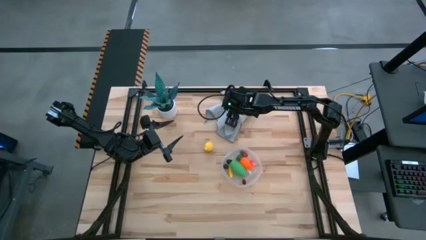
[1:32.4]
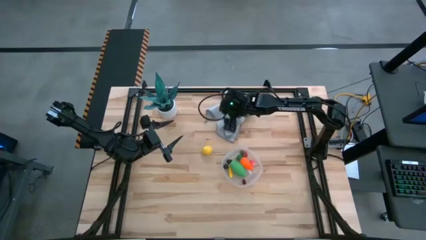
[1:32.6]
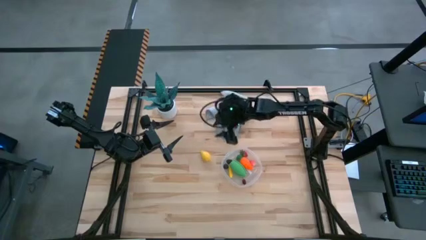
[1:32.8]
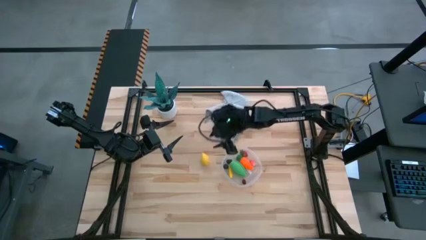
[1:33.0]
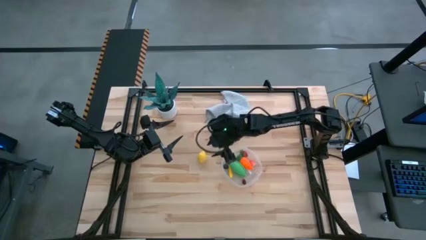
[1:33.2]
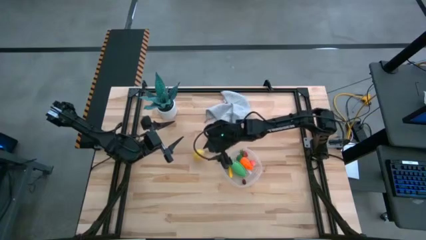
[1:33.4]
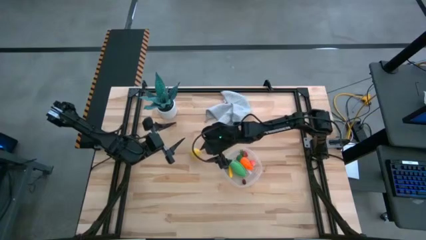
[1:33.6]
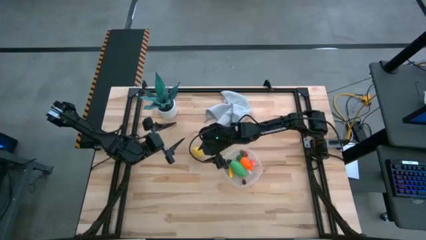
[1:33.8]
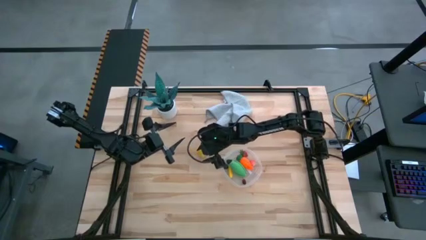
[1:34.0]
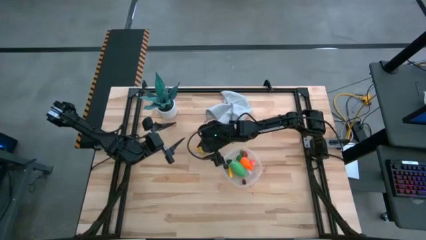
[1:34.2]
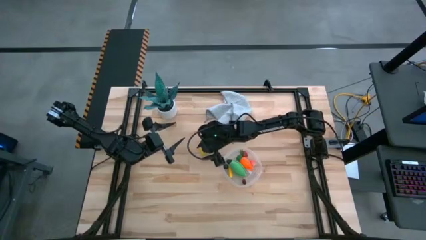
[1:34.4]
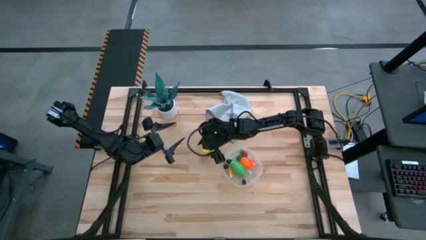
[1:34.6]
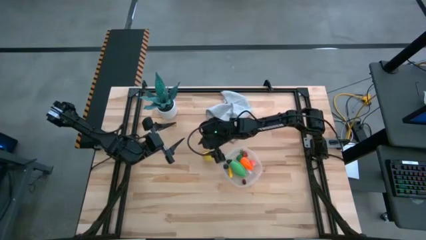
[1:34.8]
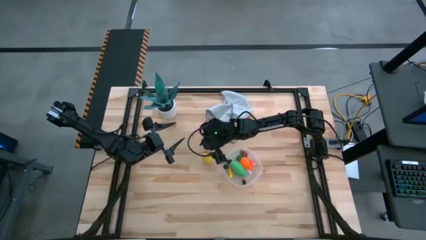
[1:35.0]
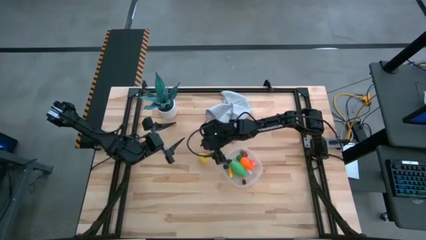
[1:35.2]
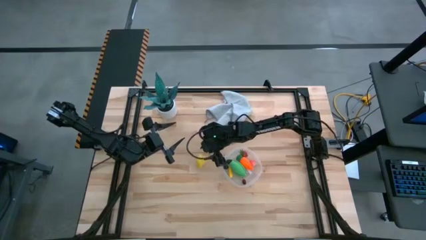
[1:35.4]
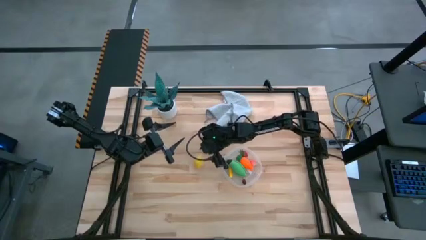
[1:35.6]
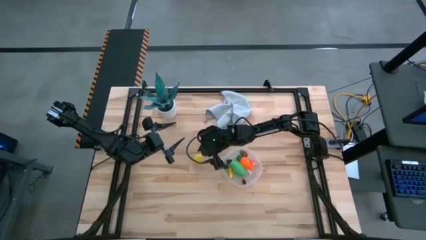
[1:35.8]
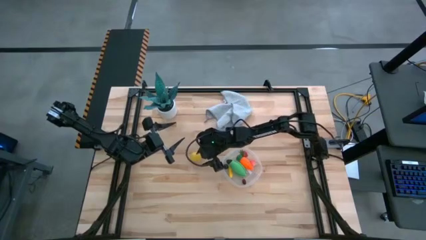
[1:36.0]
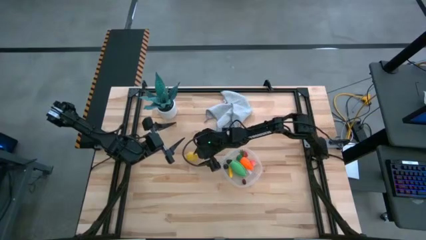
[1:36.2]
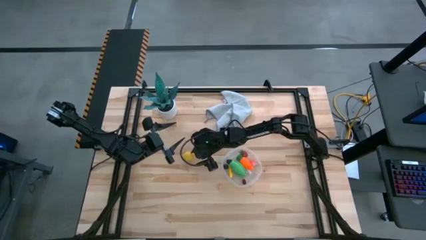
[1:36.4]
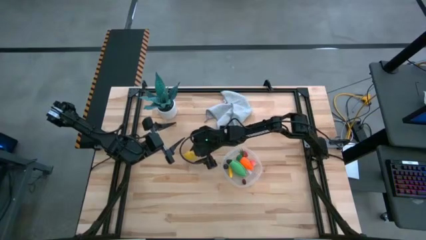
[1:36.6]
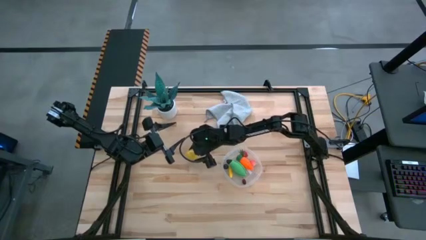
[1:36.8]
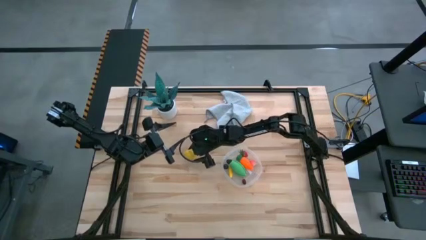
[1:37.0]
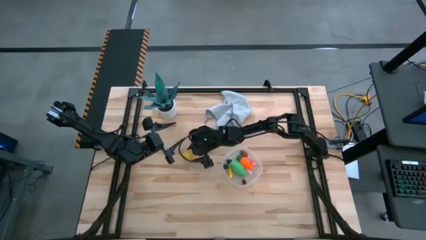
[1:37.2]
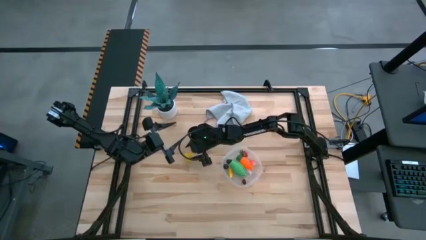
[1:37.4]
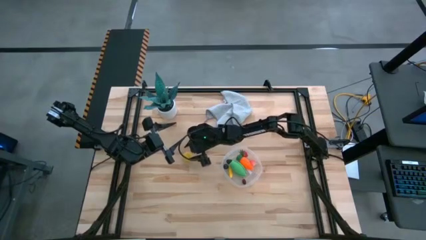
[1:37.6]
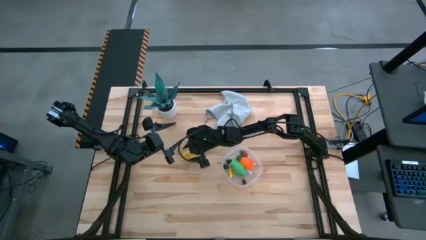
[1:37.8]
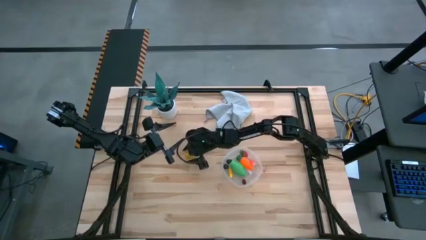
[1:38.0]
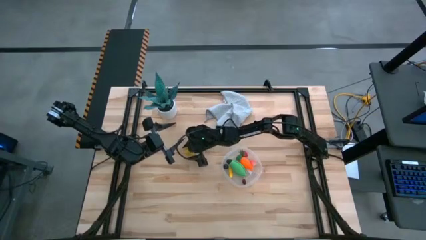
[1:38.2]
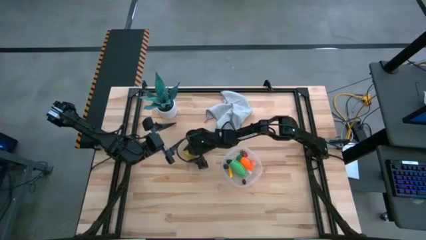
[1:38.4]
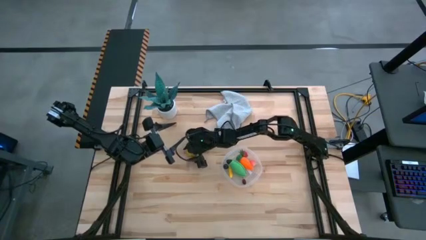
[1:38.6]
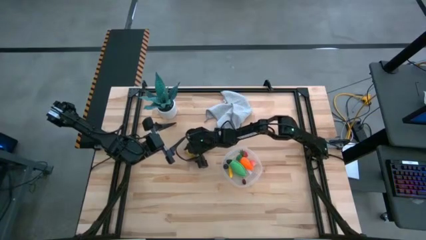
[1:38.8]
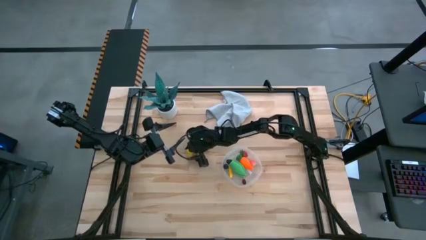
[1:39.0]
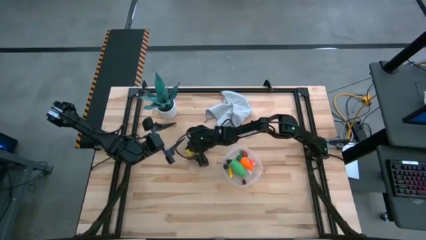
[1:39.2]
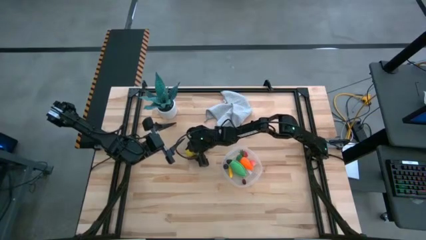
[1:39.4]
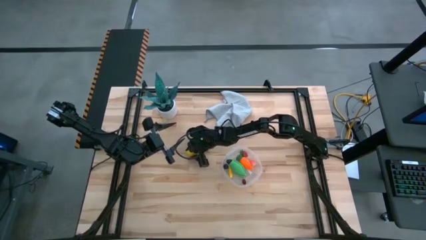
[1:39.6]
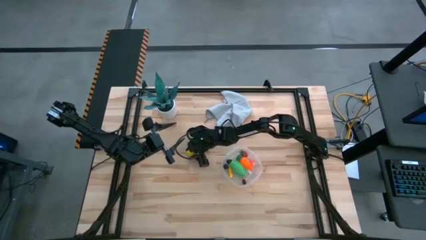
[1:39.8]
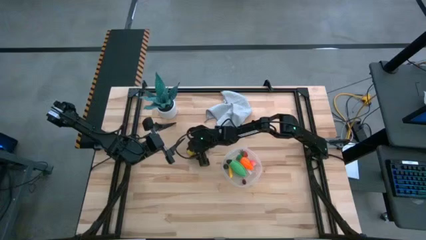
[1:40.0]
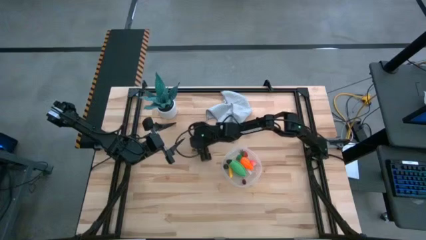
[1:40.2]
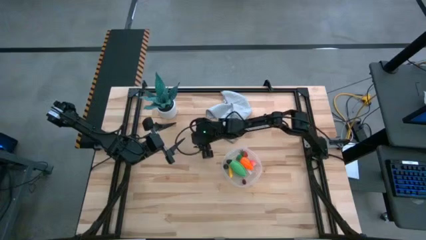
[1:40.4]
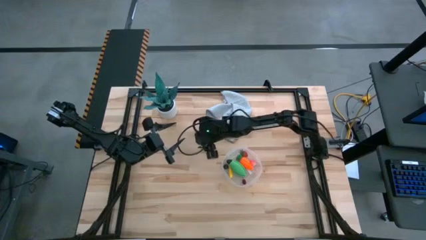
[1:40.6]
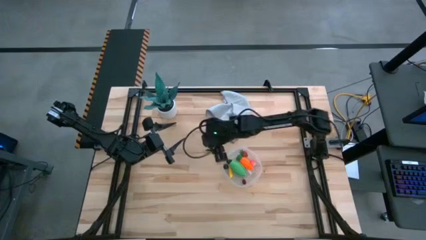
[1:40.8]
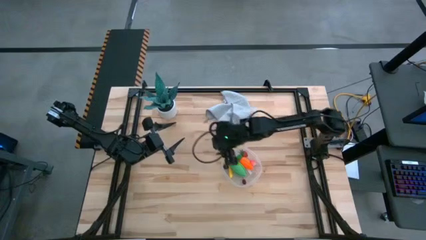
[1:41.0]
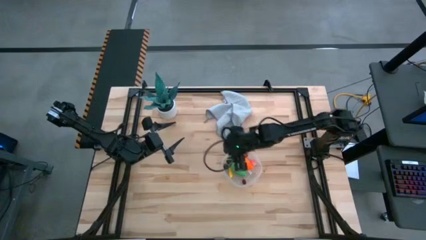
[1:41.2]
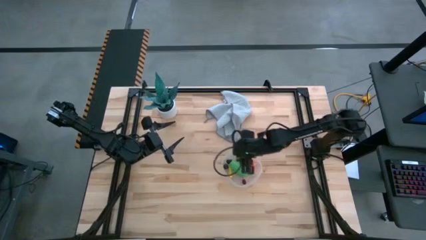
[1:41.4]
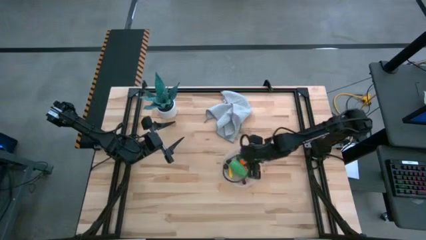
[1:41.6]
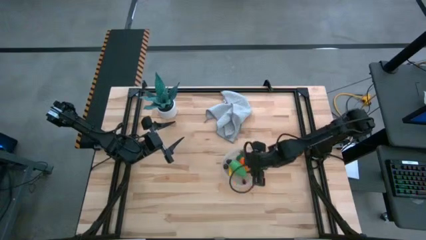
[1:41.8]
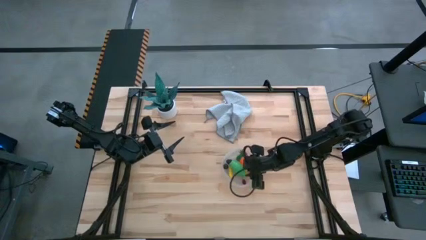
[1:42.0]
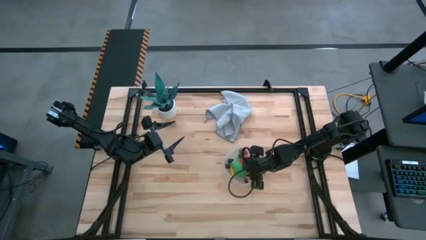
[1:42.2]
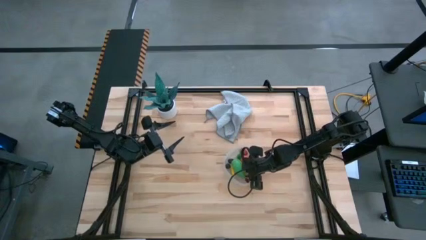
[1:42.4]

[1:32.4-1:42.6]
Task: Pick and placing Produce into tupperware
Put the lemon into the transparent bin

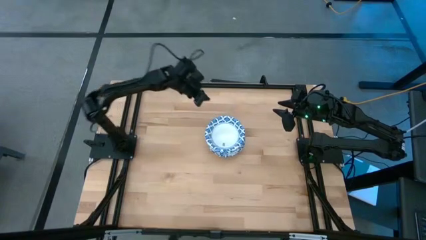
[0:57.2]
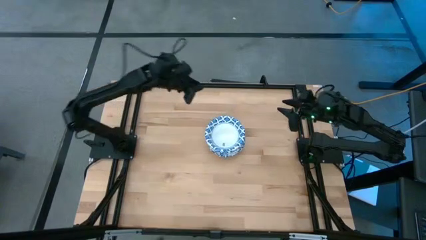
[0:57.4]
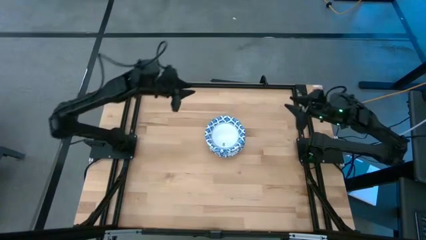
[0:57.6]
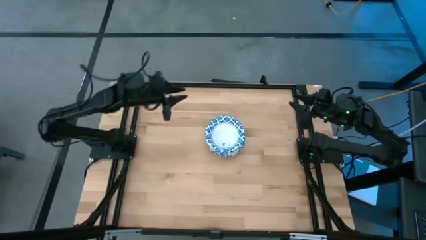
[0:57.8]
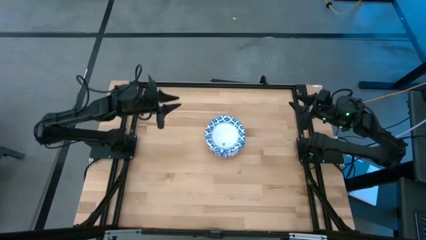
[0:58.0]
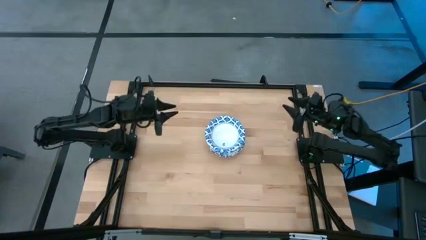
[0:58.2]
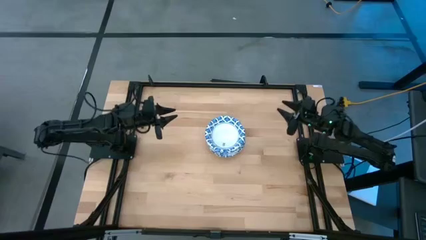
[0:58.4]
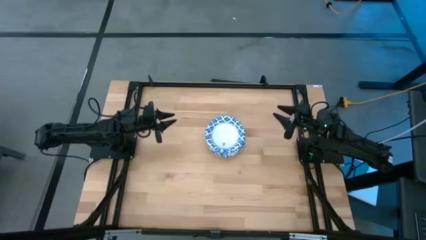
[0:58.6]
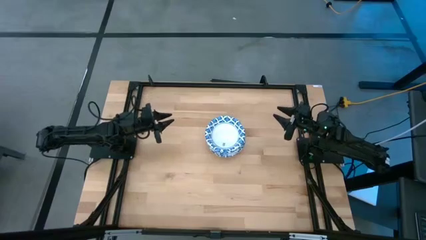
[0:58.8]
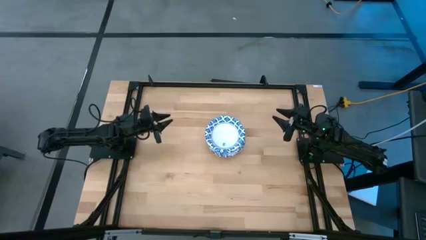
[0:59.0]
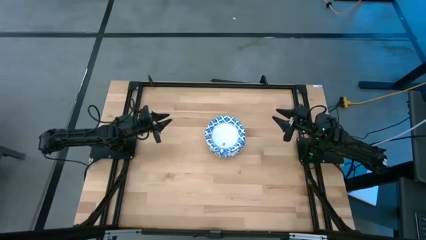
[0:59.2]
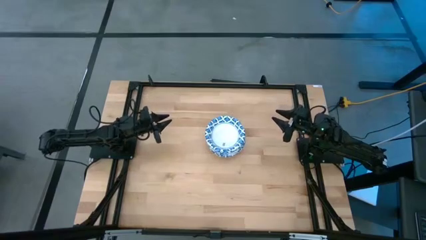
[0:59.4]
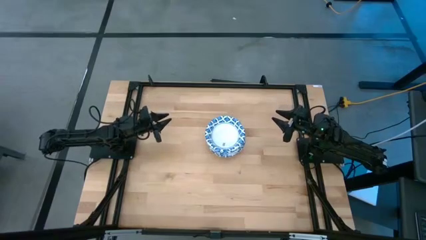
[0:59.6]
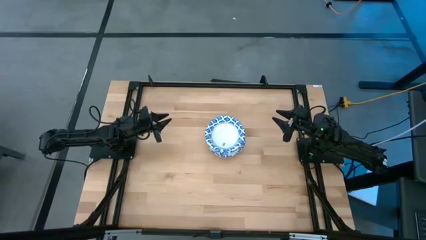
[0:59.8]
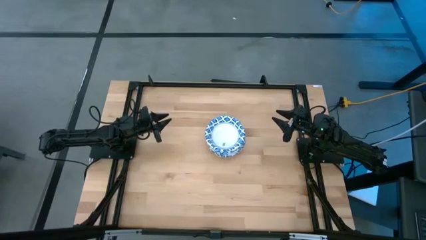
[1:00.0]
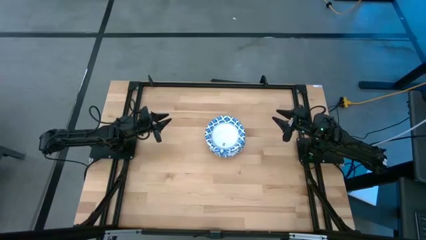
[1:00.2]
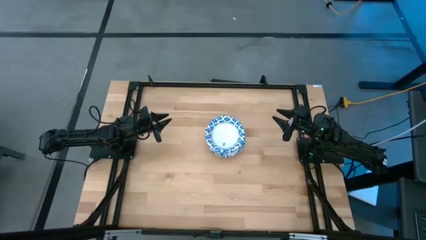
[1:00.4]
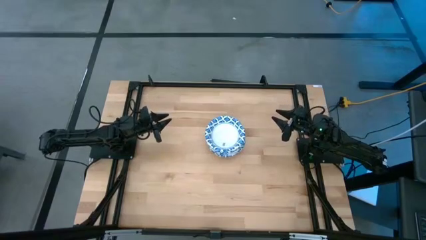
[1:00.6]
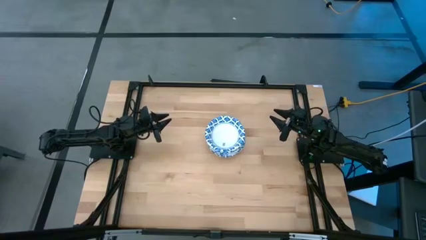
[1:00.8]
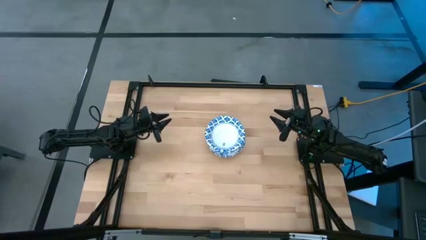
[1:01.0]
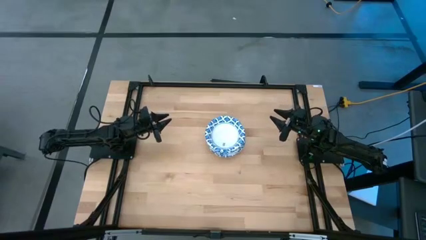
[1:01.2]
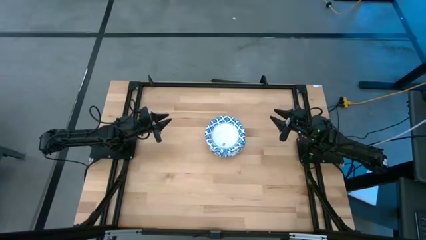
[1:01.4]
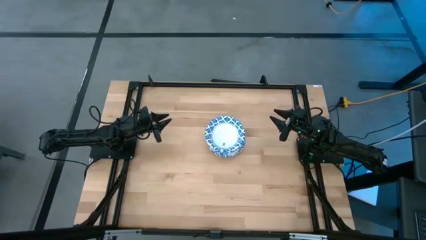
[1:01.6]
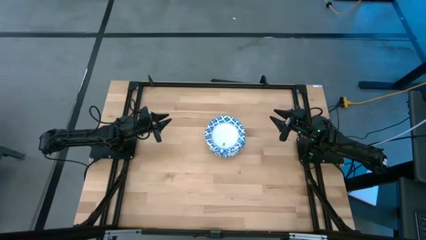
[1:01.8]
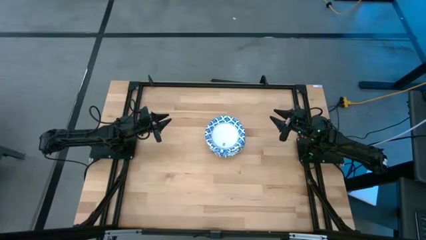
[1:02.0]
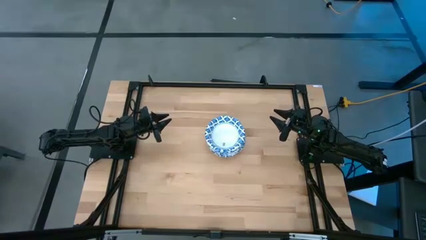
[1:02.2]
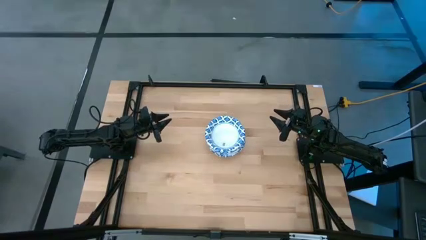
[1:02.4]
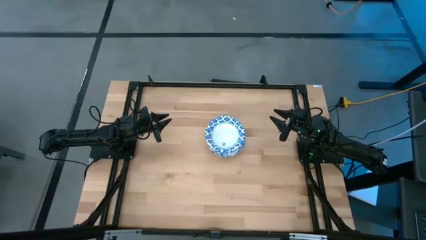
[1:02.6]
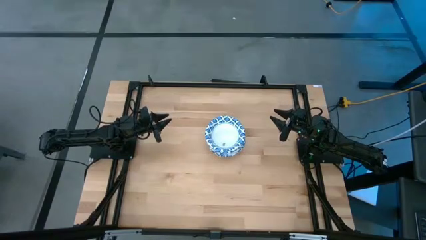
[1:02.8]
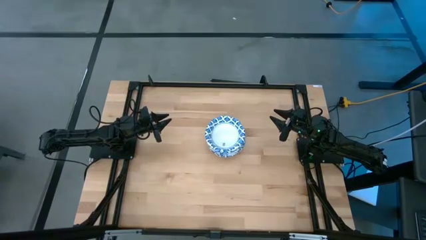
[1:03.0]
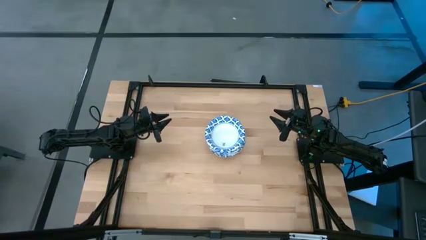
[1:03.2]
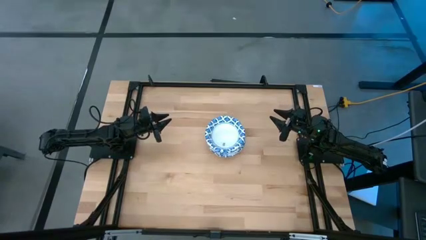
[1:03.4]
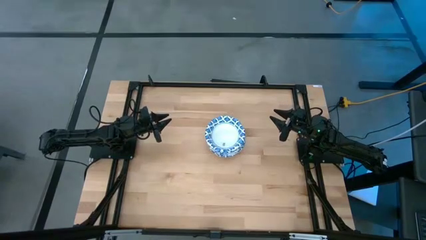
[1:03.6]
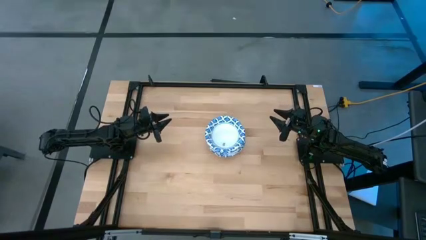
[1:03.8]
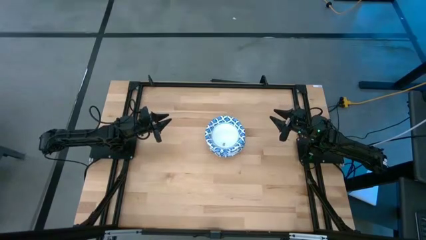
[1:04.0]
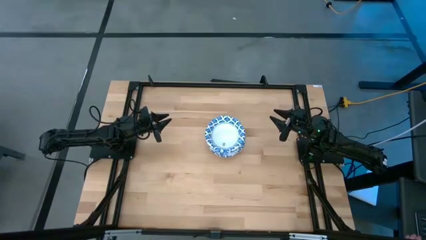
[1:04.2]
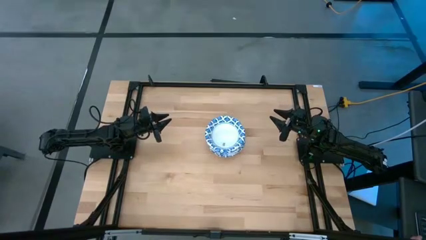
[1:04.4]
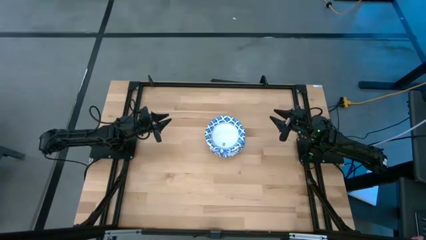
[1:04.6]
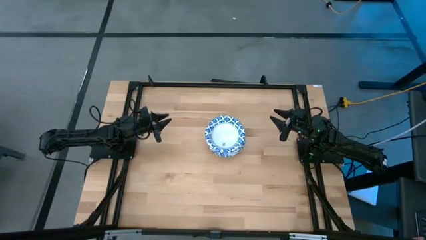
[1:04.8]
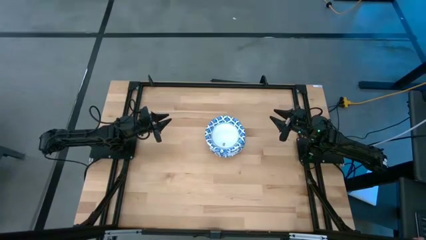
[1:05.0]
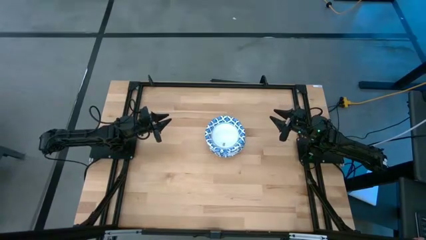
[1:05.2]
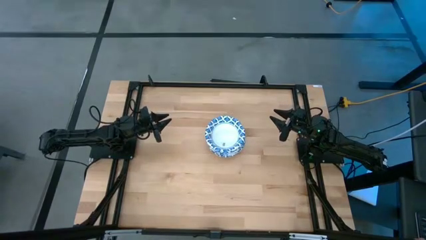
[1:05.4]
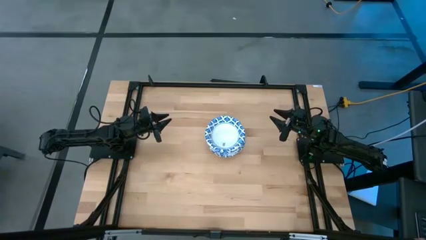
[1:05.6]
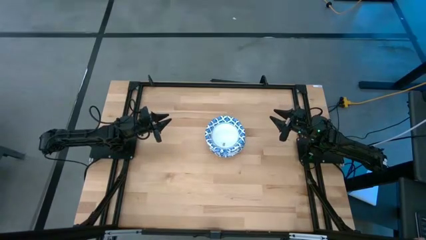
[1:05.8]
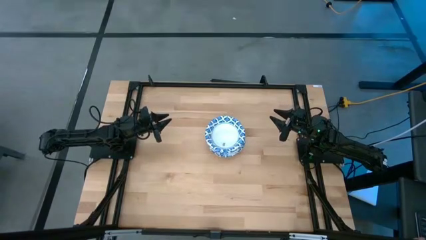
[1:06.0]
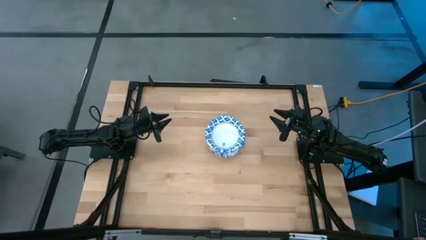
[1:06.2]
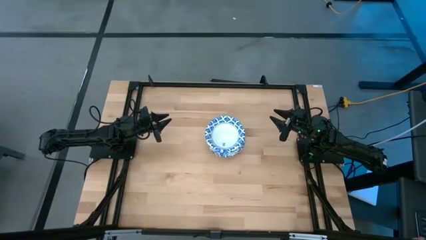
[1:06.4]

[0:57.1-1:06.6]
Task: Nest bowls inside each other
Return to Home Position
